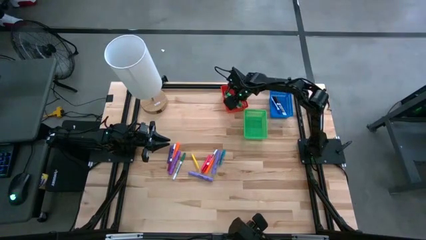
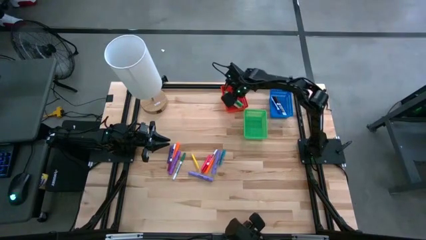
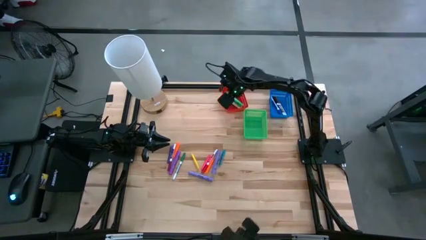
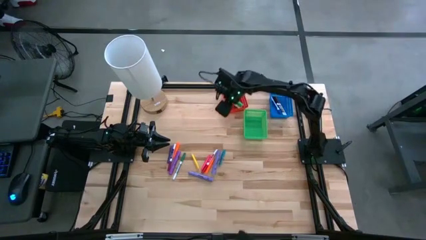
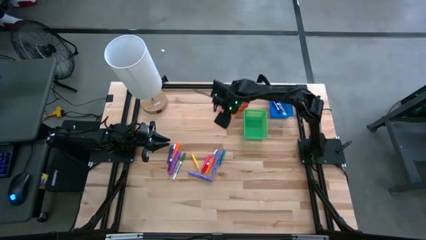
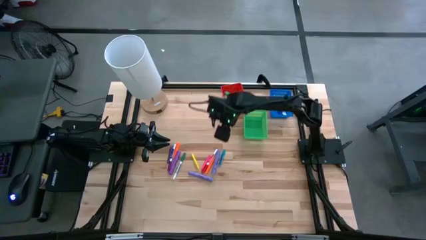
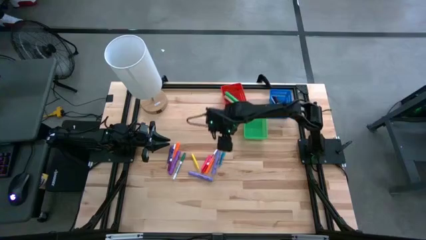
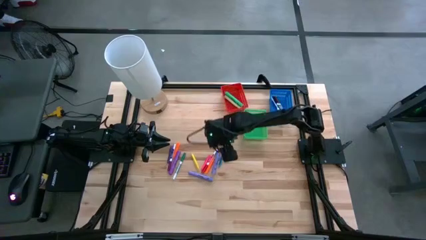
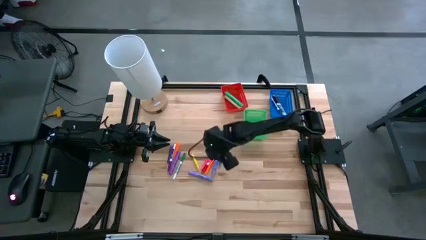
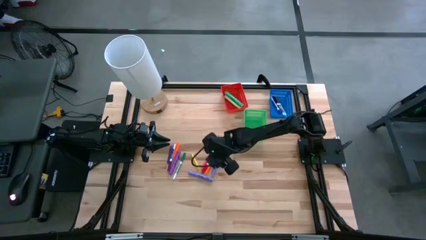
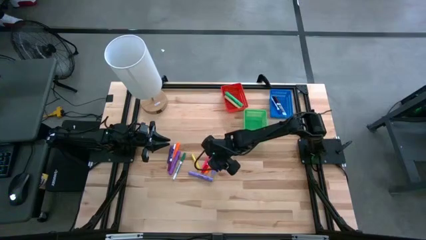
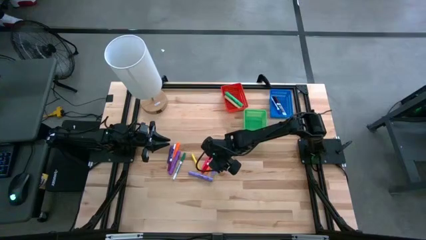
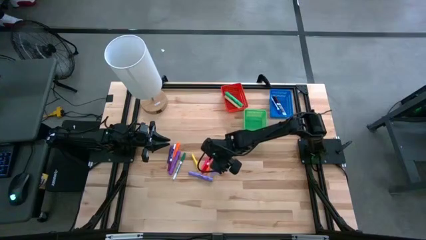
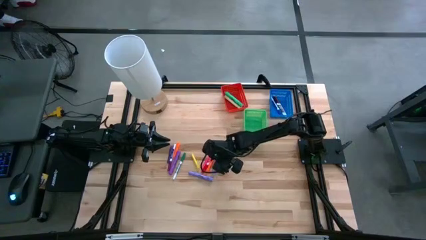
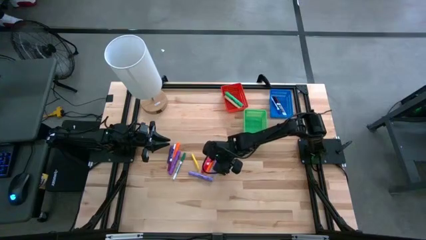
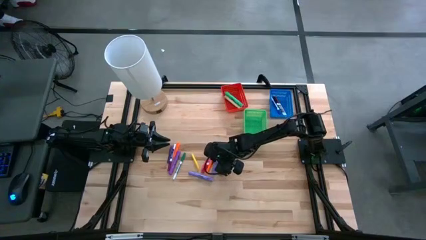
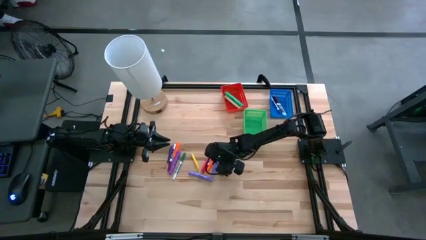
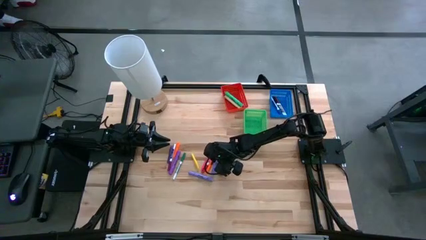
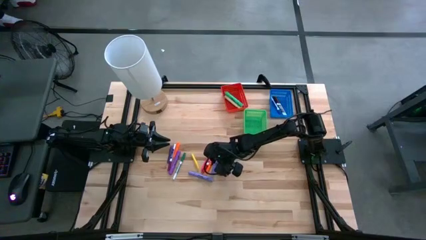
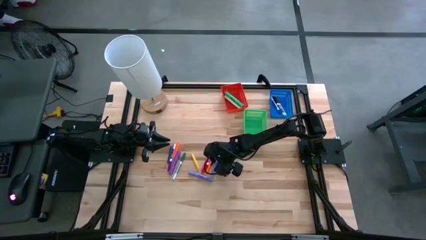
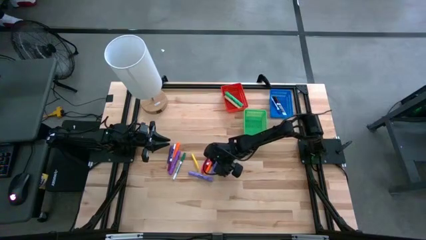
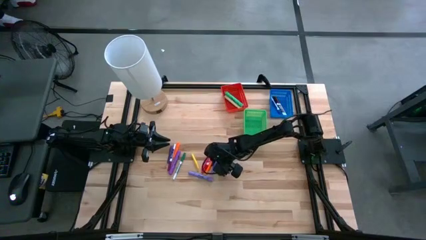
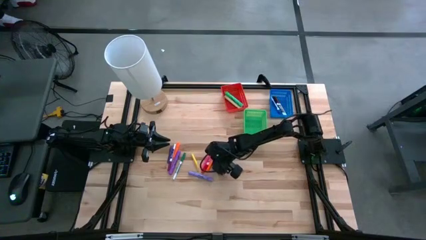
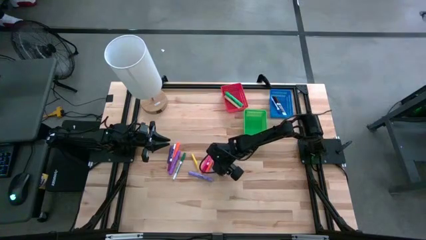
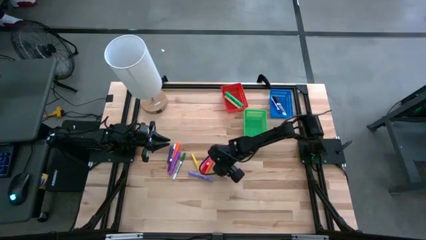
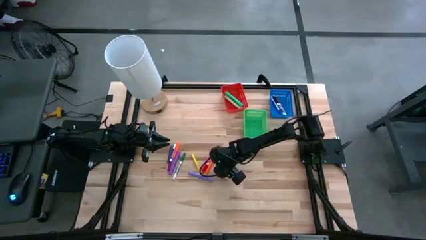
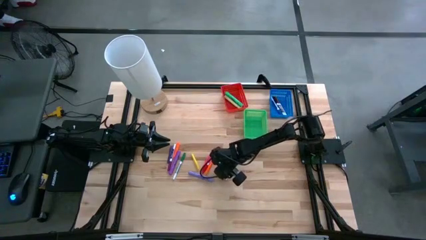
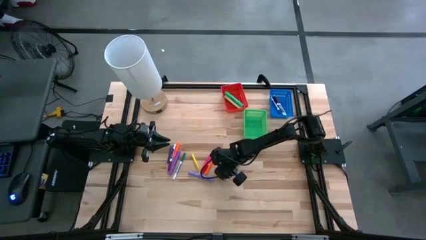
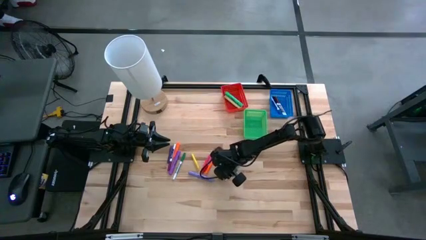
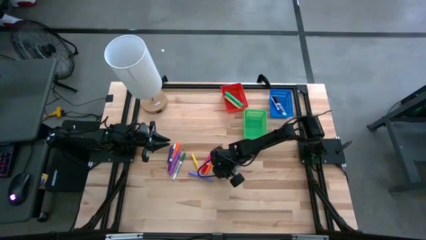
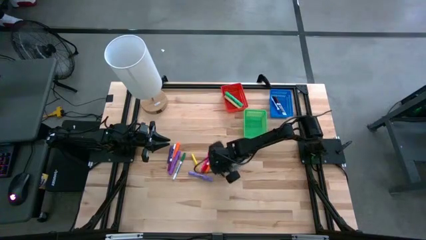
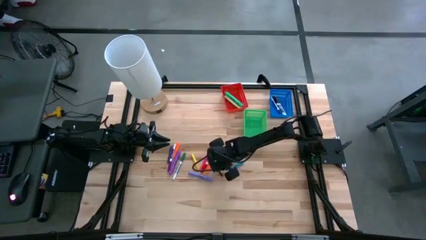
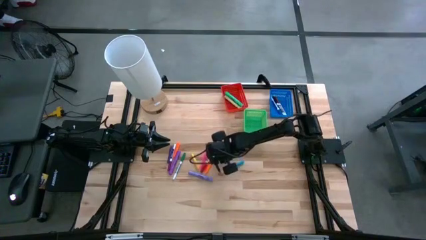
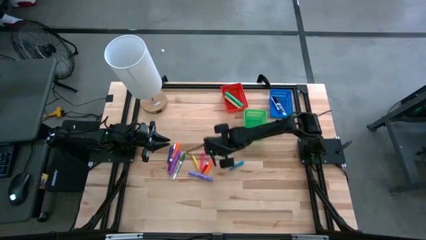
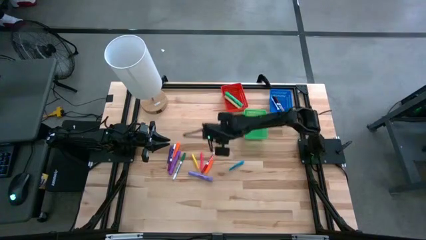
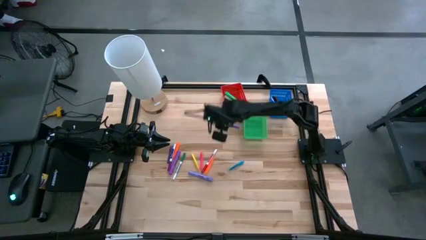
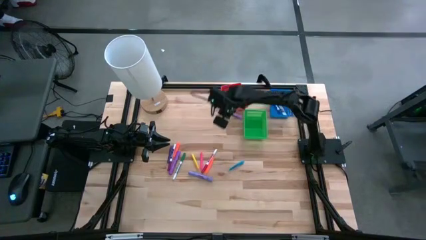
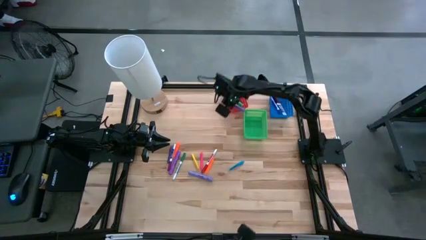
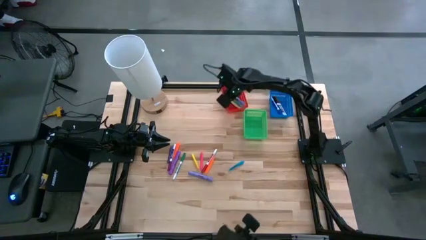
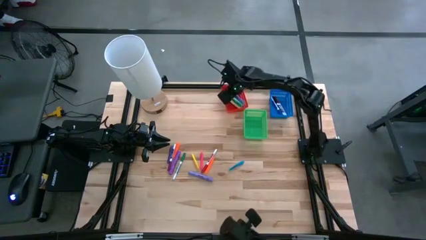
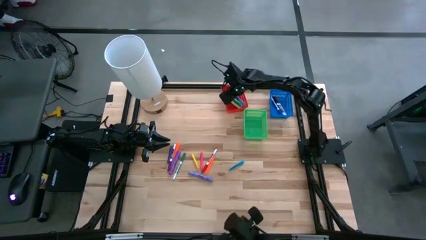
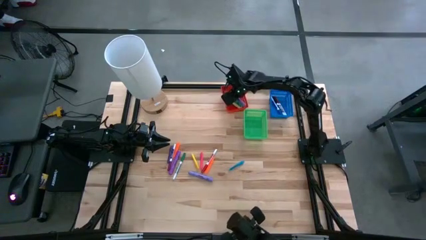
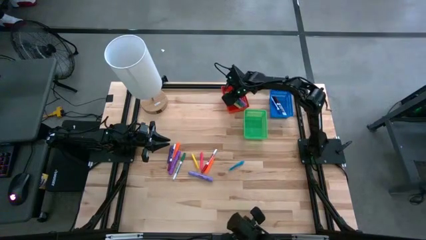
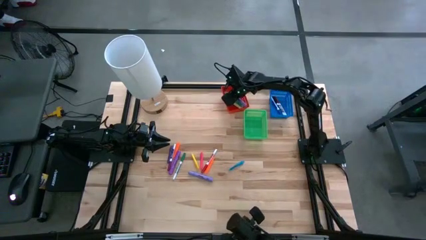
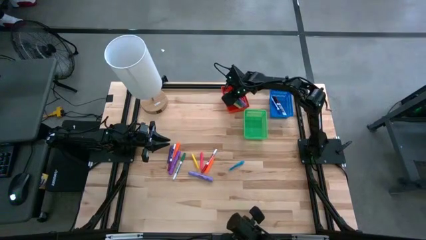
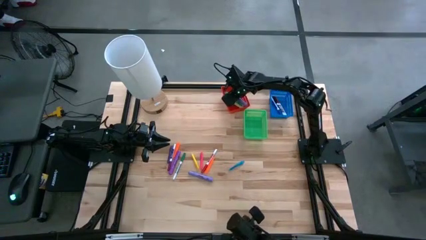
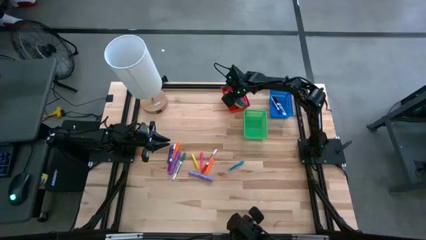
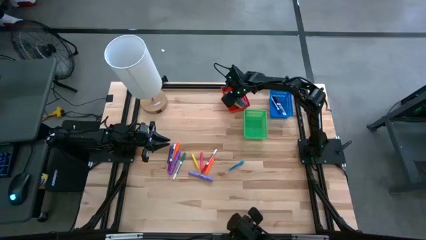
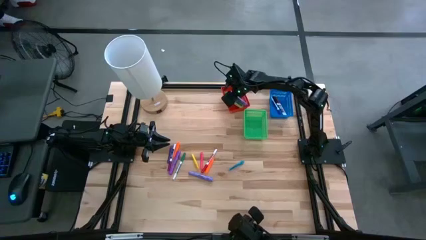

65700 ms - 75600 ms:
Task: Pick & Place Markers
Put the right purple highlighter in the red bin

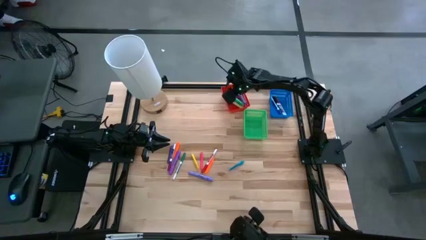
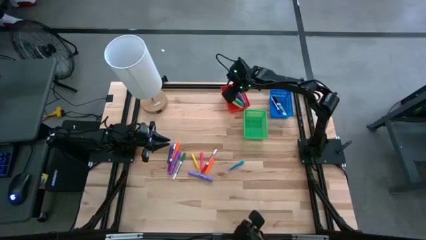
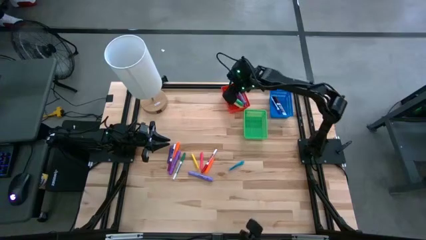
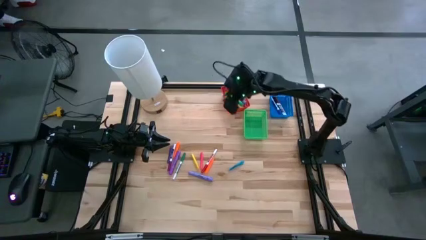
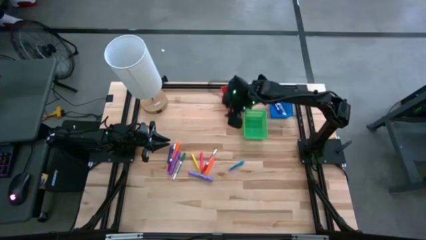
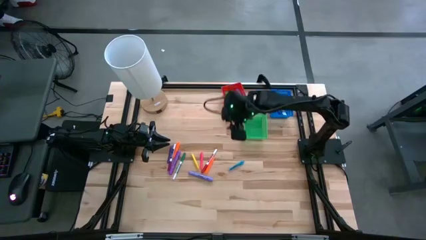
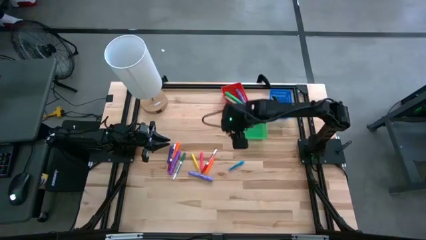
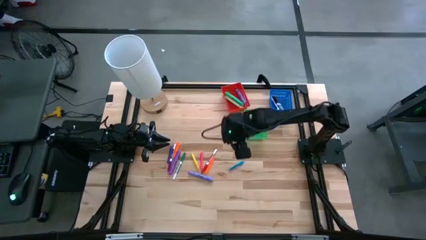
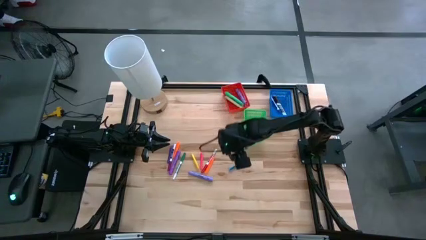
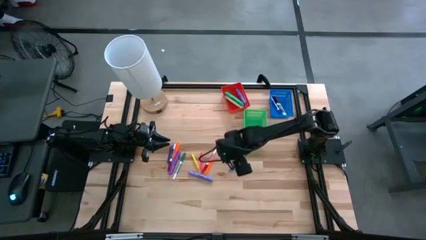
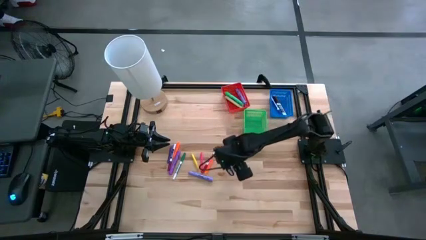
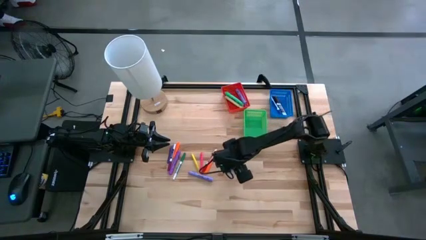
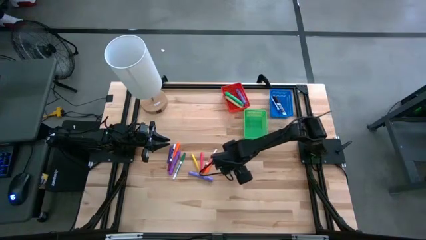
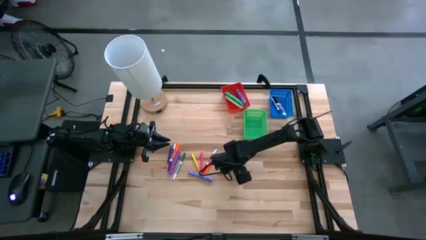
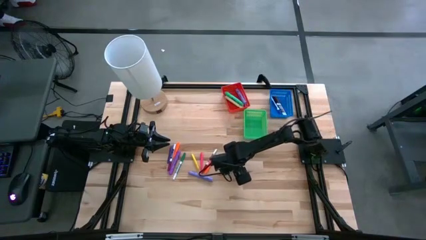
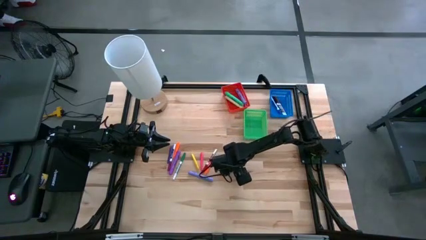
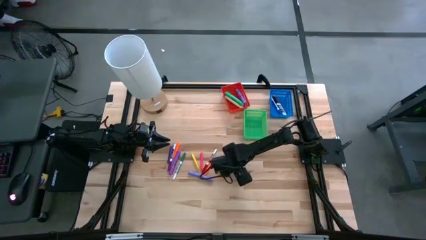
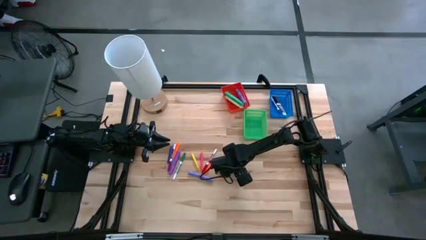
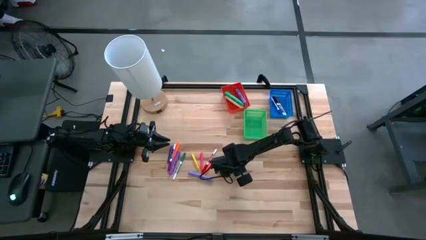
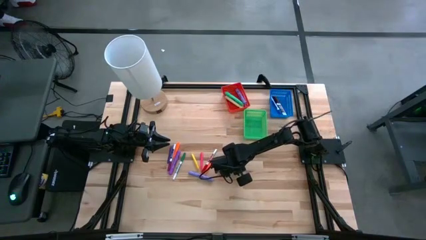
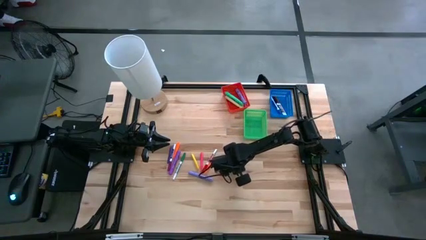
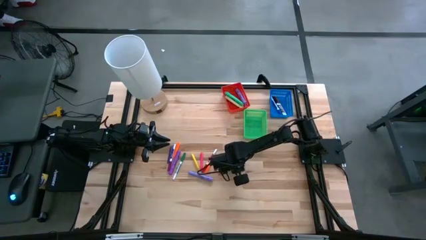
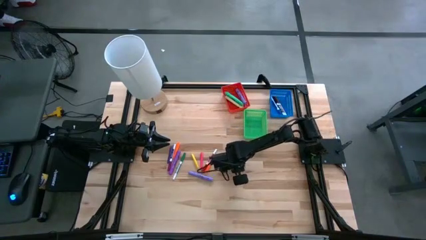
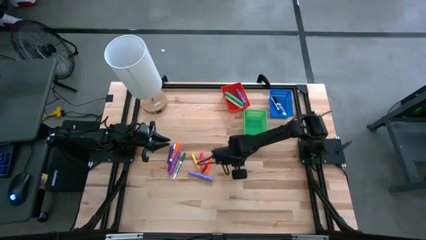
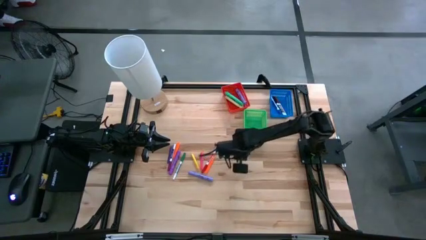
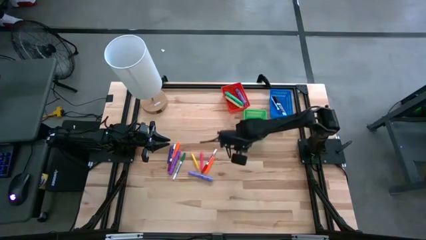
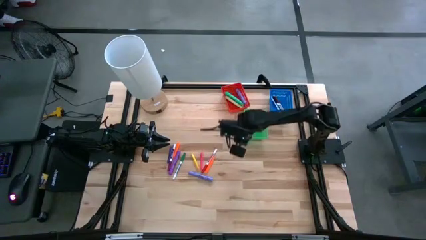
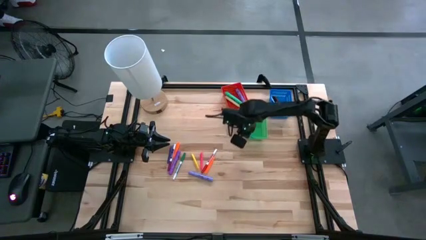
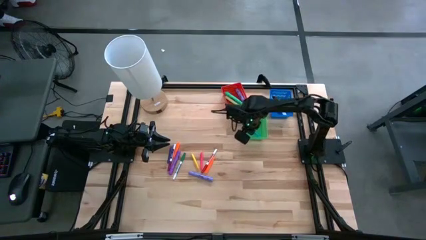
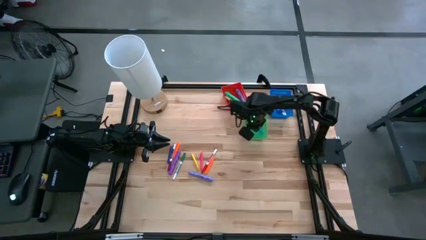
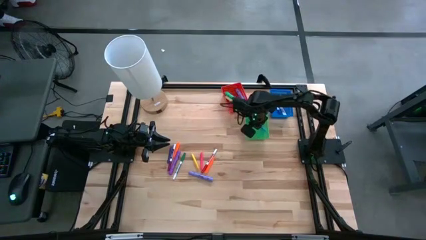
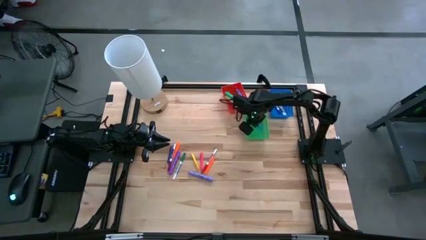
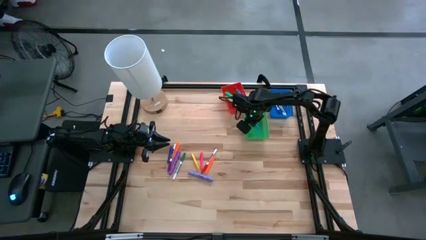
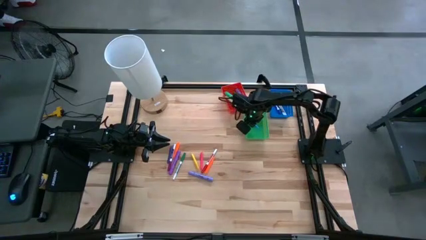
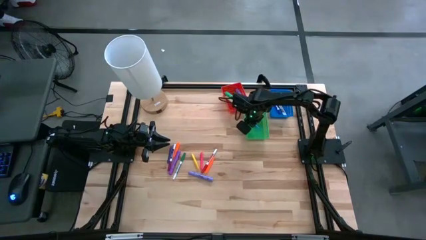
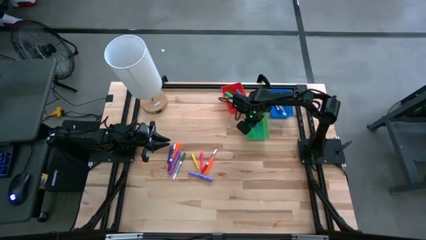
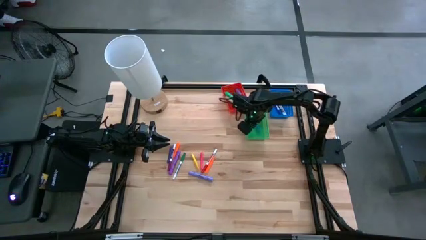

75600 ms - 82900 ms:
Put the blue pen in the green bin
